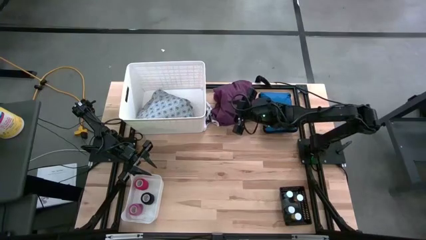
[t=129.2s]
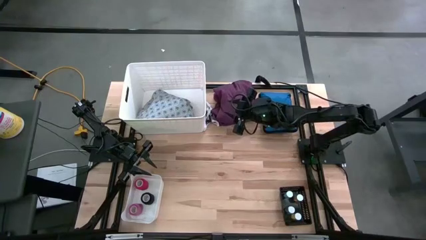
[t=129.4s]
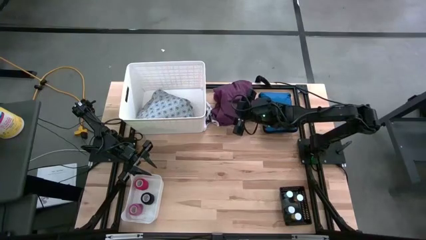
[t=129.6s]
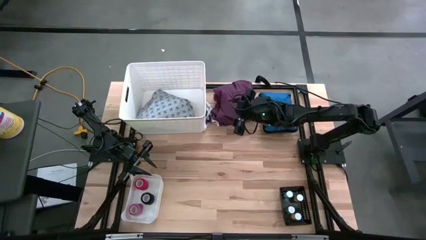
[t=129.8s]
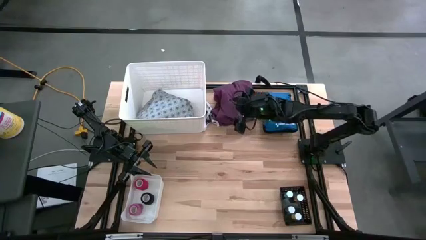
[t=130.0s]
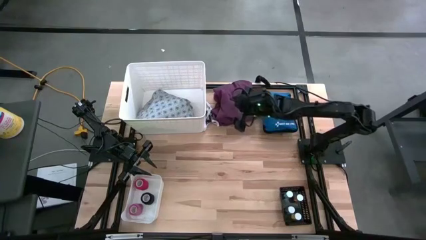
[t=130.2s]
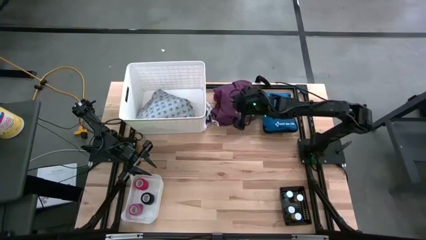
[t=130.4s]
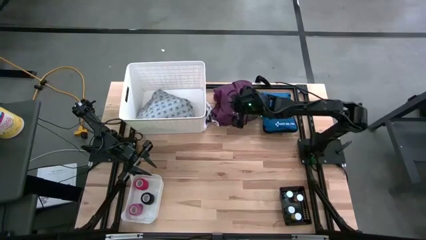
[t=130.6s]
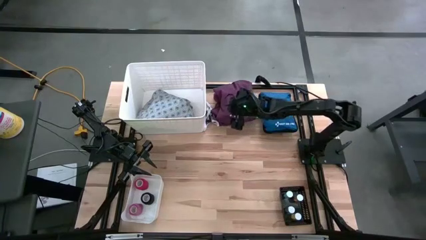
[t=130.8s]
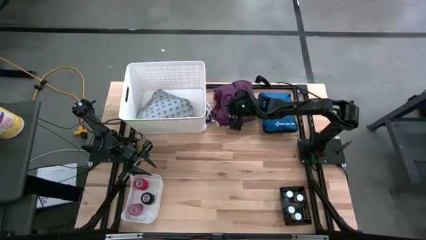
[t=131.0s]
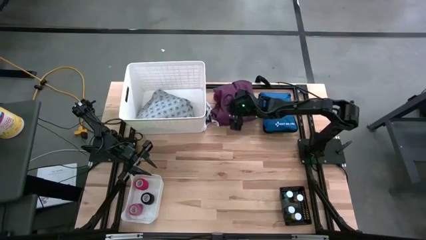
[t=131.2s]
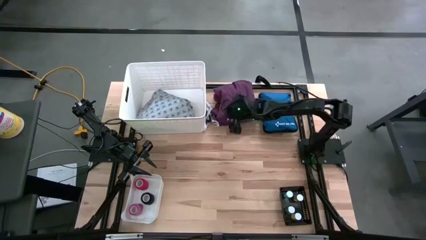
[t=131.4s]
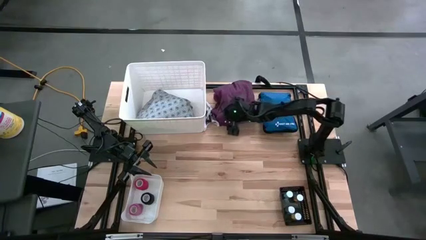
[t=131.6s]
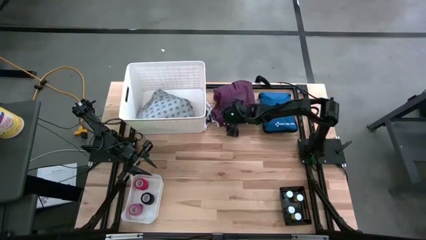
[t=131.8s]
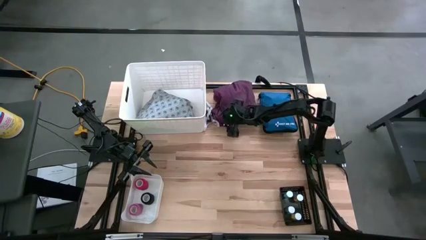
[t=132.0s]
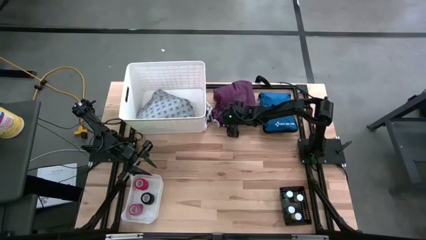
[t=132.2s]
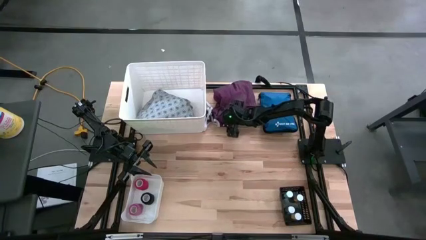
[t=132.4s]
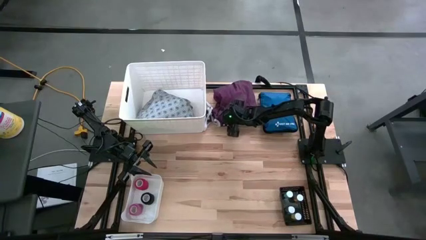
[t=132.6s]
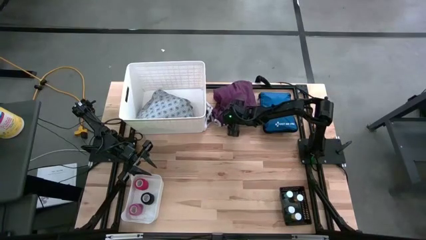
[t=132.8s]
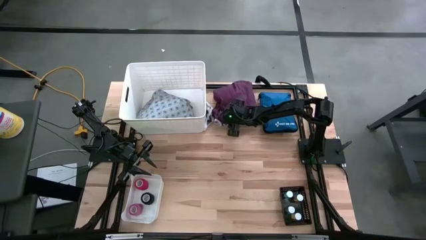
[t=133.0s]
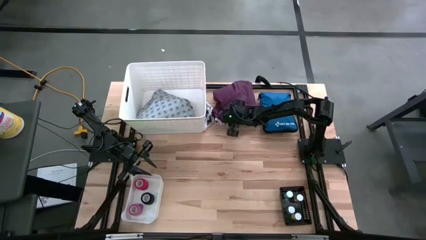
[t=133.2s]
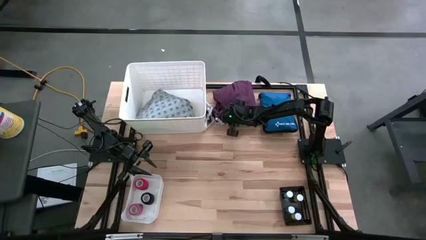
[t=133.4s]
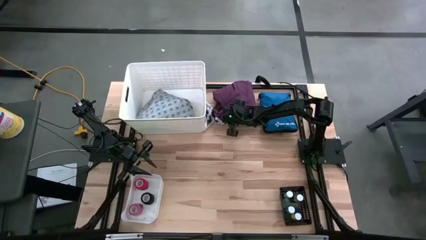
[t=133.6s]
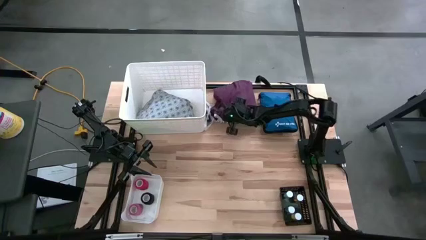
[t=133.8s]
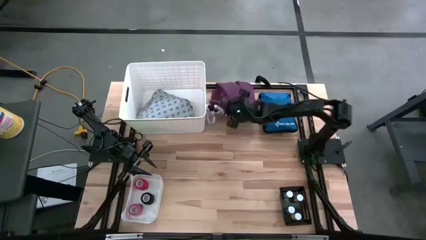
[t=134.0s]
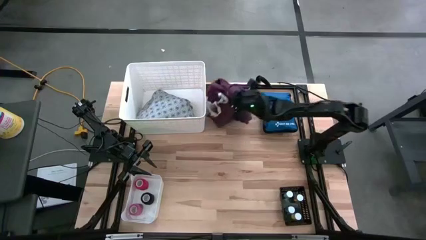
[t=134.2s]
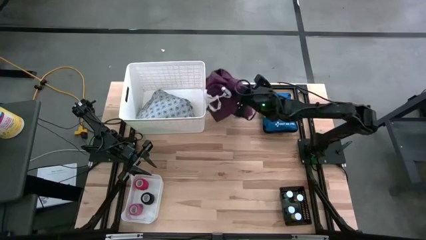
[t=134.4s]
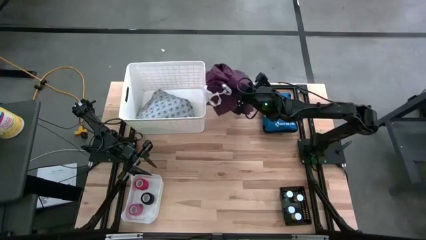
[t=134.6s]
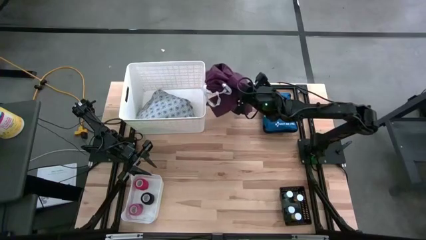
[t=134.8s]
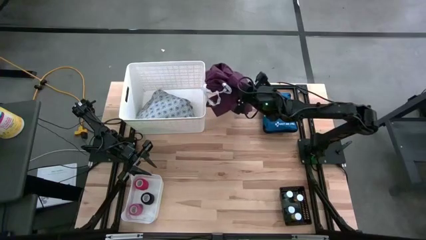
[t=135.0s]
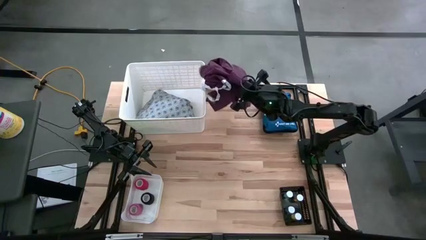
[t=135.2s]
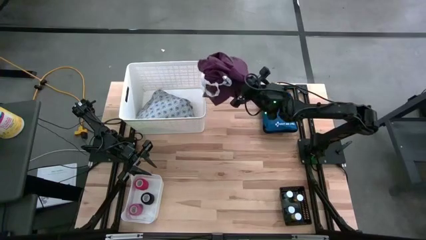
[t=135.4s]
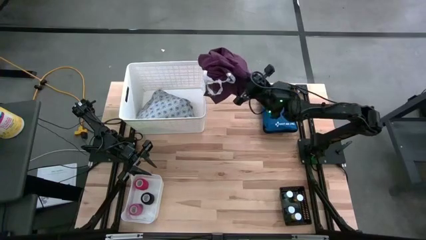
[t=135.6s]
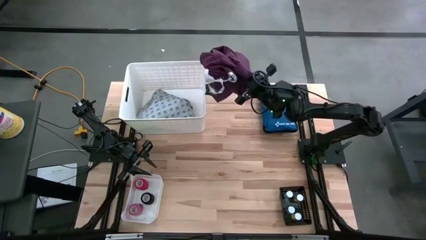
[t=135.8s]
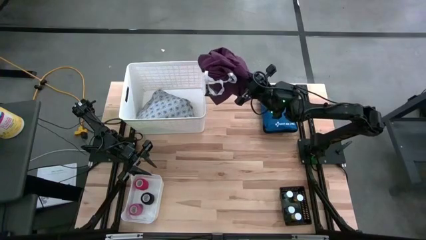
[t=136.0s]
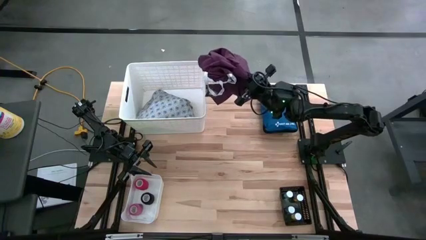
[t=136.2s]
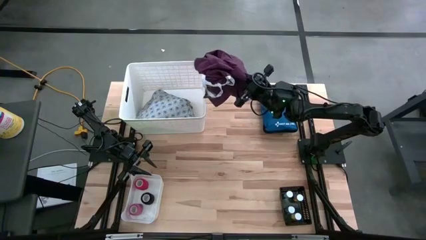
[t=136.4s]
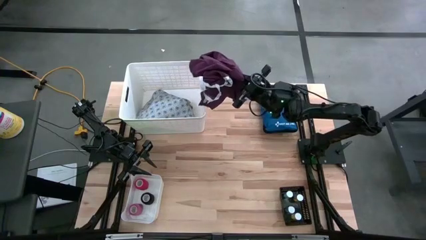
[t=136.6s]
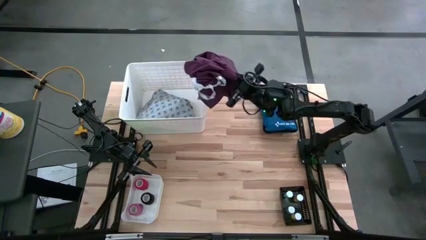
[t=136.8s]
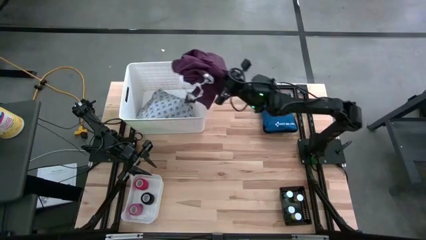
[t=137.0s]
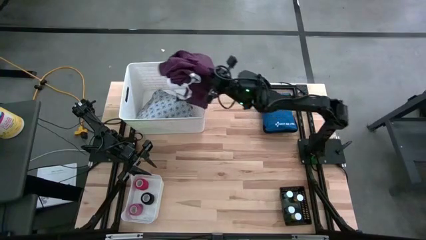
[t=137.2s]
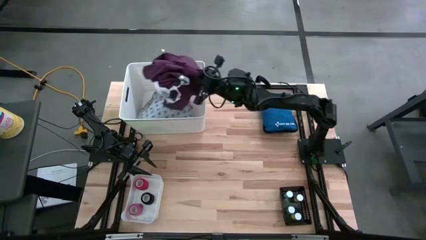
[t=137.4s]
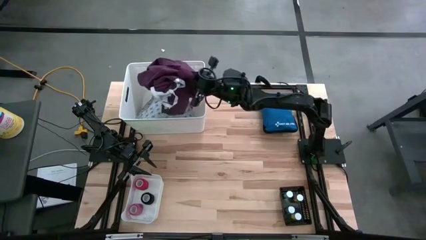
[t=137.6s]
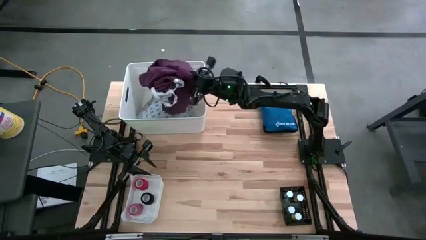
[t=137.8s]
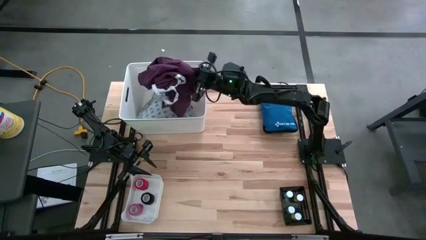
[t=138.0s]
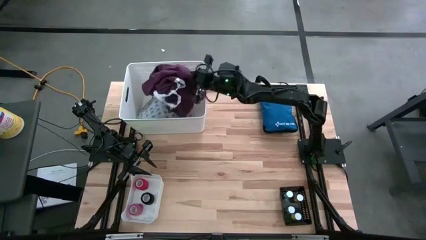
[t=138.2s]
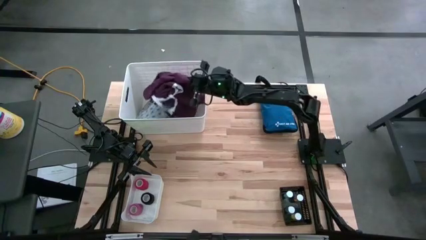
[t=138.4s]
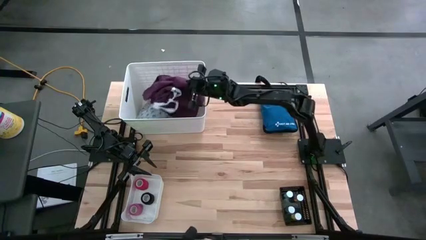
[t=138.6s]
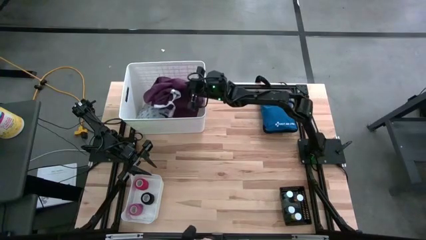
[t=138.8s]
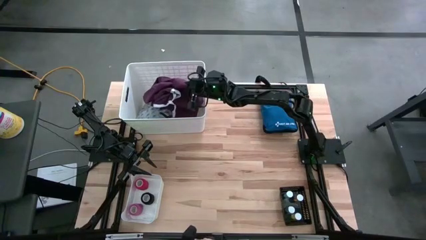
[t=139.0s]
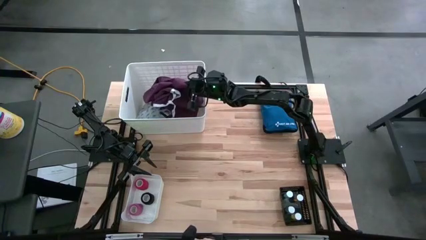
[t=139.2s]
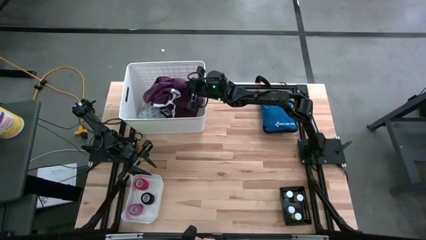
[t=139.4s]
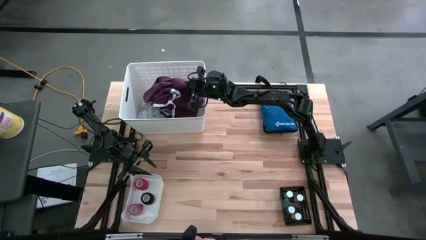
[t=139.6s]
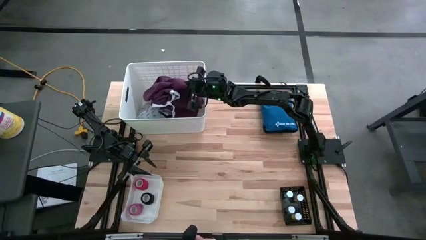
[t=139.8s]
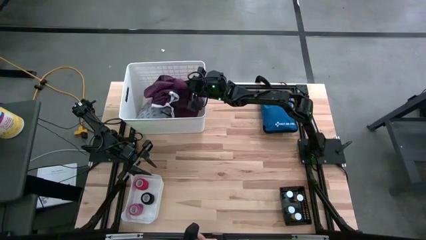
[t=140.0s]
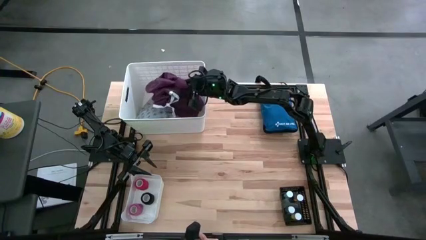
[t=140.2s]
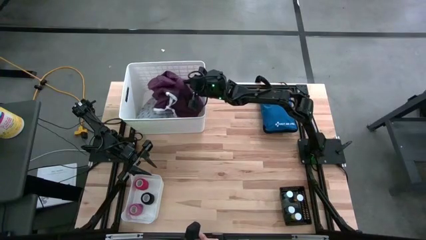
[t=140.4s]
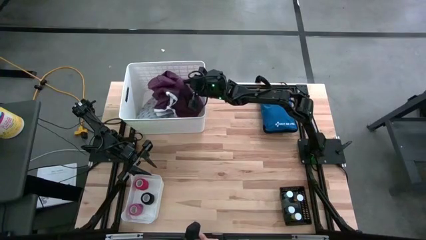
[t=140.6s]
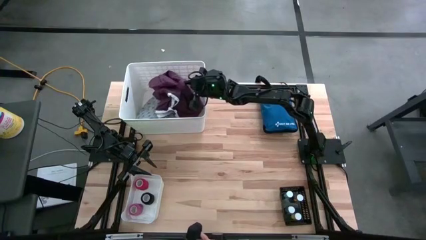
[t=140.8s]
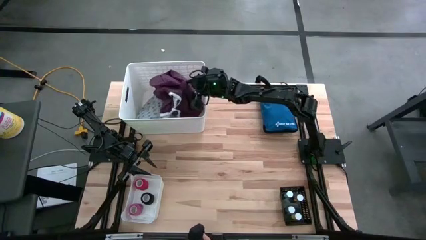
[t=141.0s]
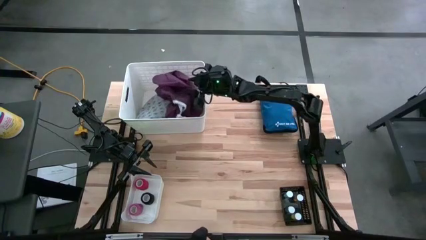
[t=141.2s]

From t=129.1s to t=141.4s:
Task: Pick & place medical supplies in basket/bin
Put the violet patient gown into the top white bin
